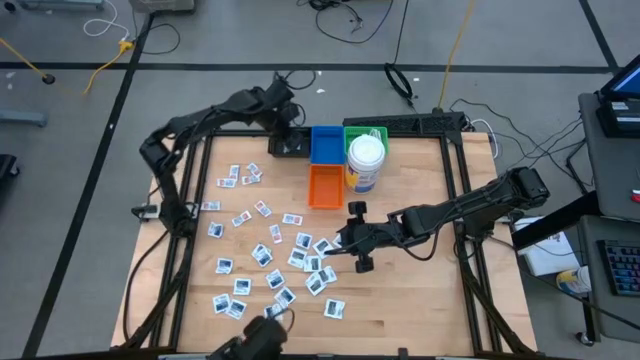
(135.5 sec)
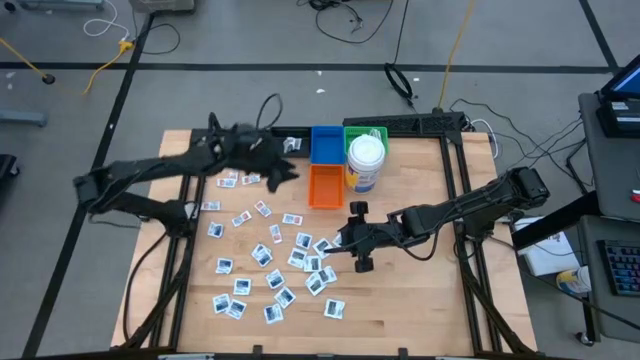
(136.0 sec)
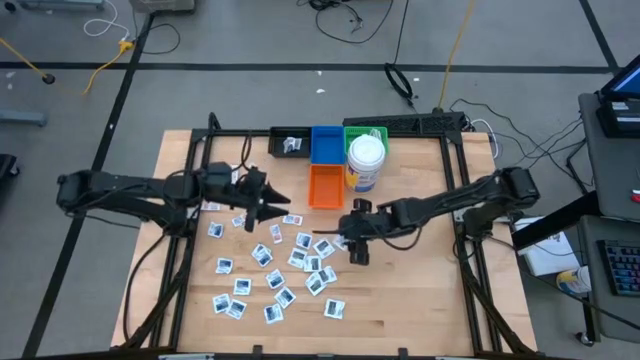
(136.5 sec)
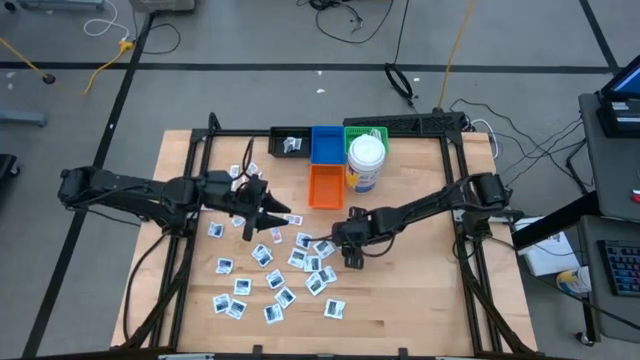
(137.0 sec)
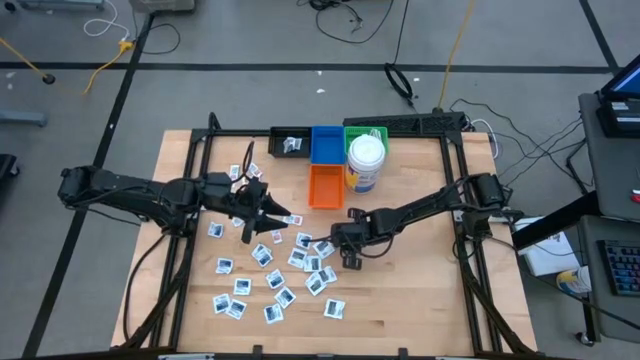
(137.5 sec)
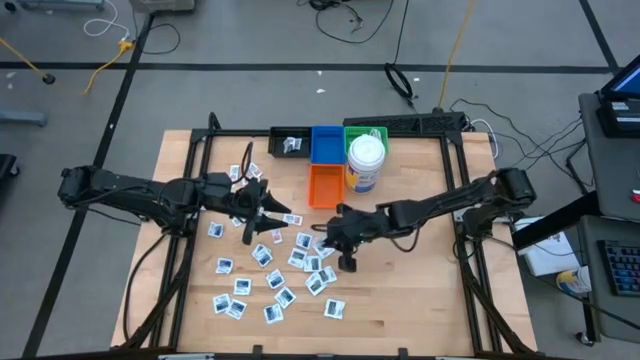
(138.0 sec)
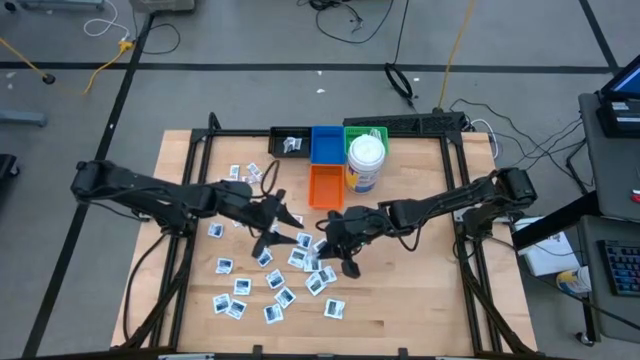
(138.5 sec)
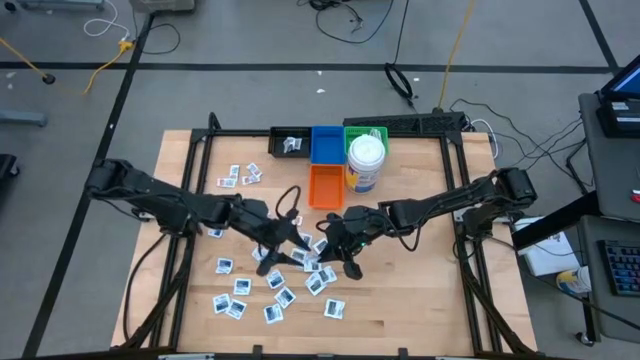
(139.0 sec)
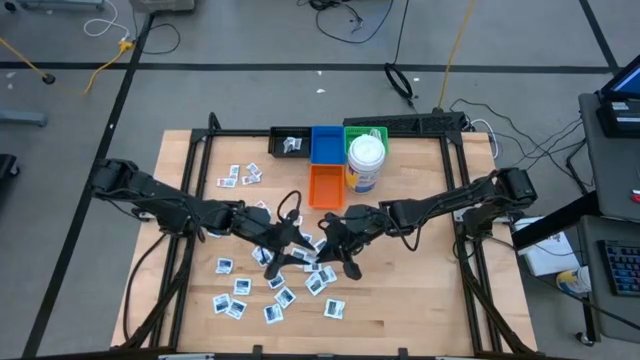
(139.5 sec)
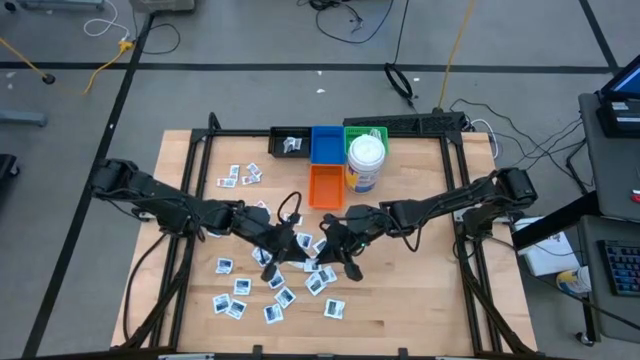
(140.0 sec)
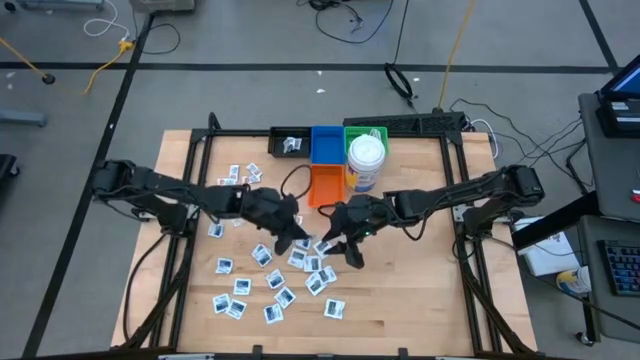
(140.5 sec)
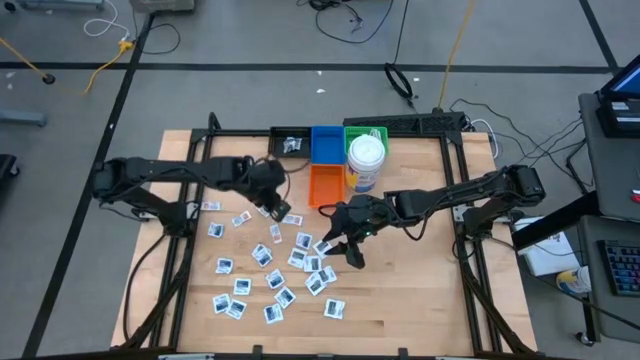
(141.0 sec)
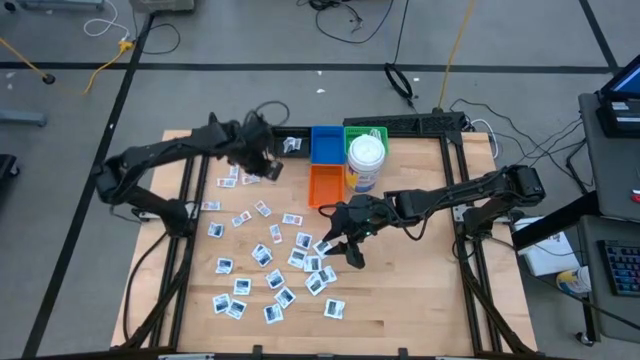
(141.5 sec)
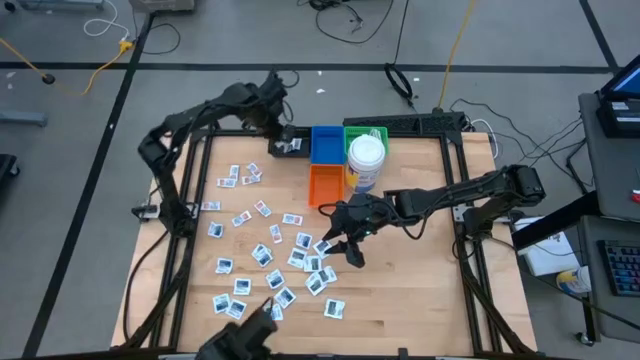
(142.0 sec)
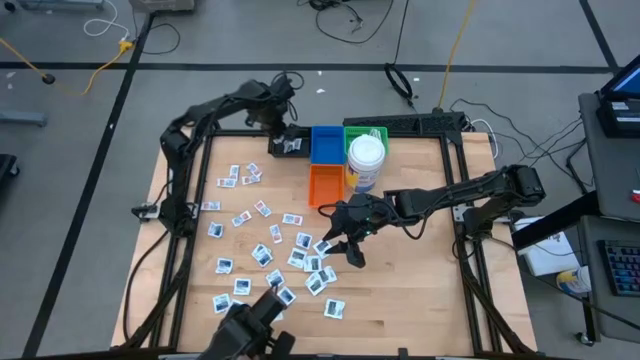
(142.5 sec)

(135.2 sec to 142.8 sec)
Task: Pick & Place First Aid Supplies
Put the gray towelette pack into the black bin

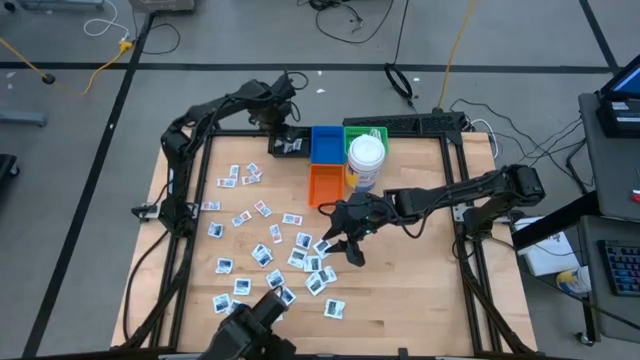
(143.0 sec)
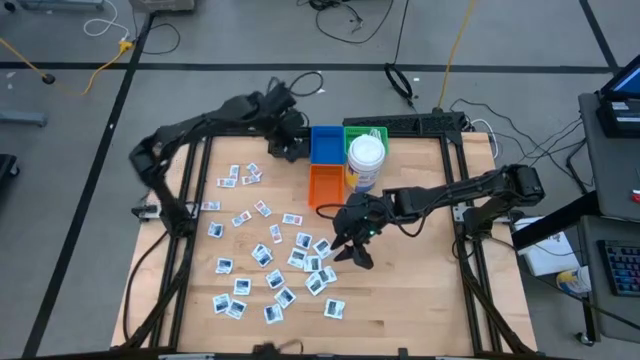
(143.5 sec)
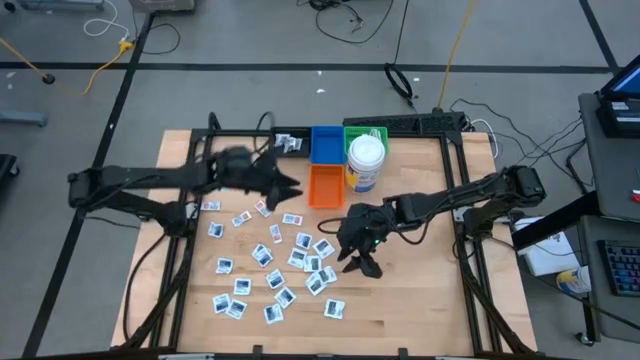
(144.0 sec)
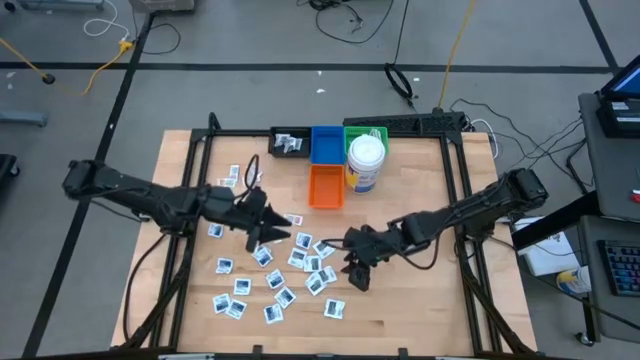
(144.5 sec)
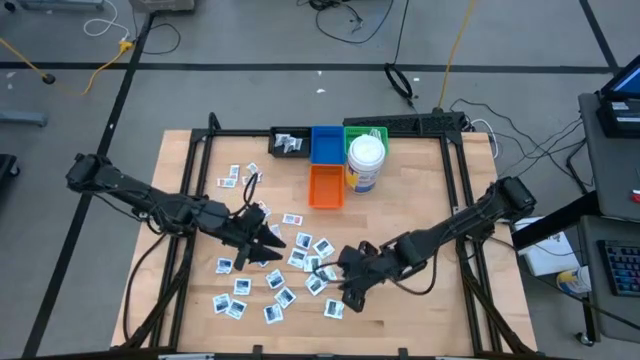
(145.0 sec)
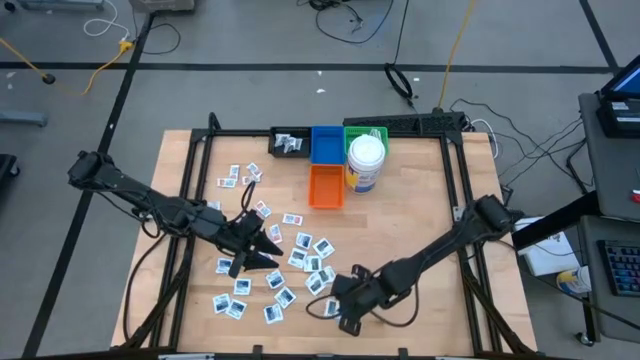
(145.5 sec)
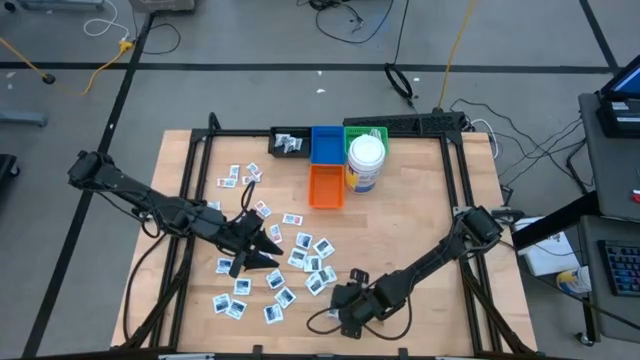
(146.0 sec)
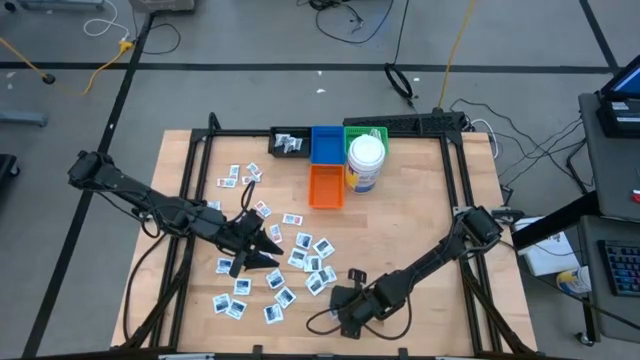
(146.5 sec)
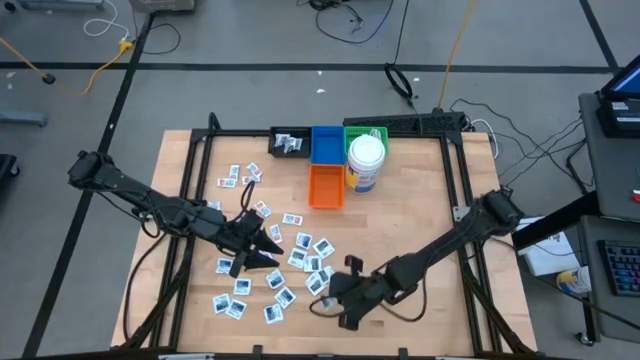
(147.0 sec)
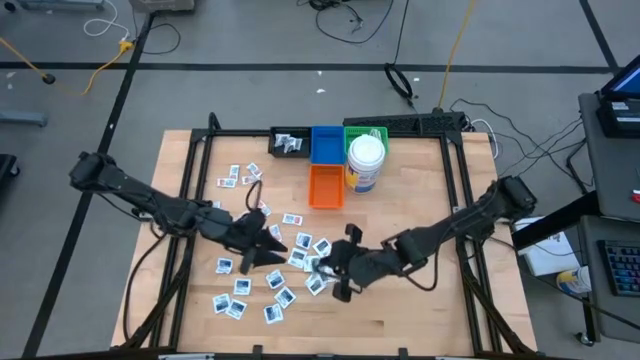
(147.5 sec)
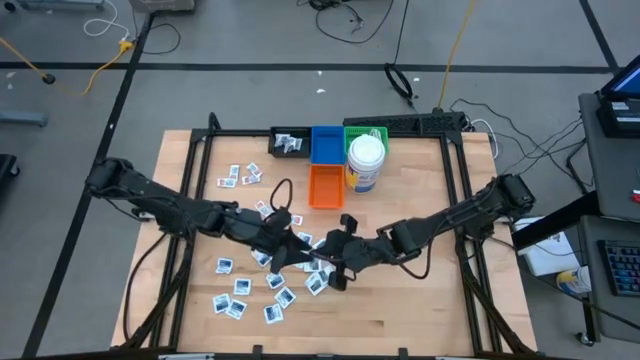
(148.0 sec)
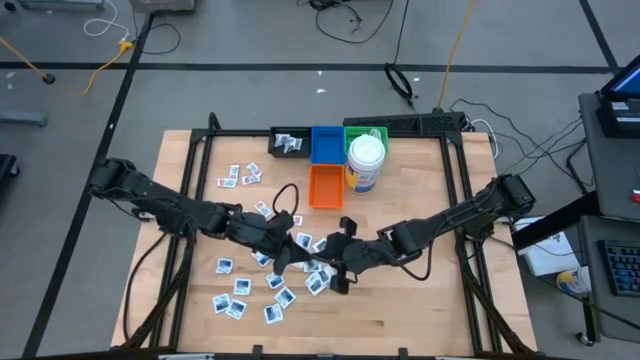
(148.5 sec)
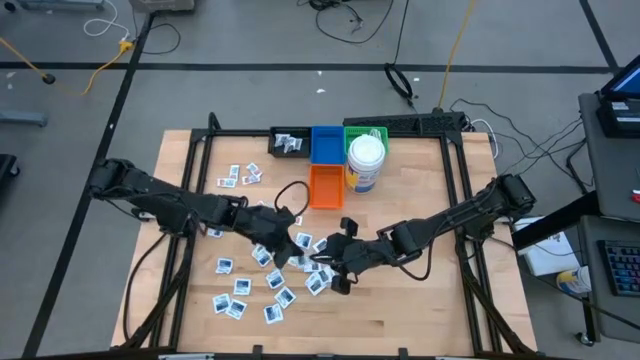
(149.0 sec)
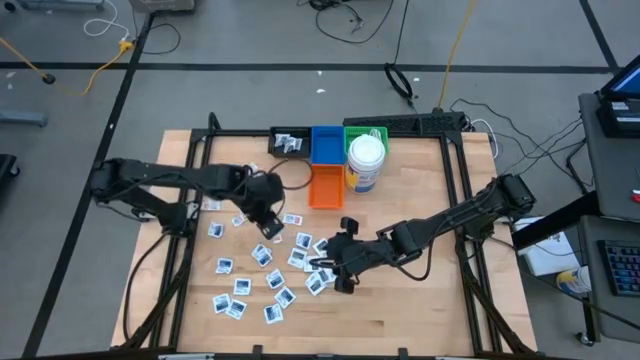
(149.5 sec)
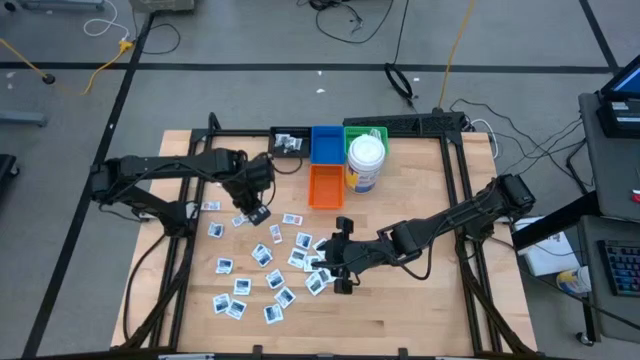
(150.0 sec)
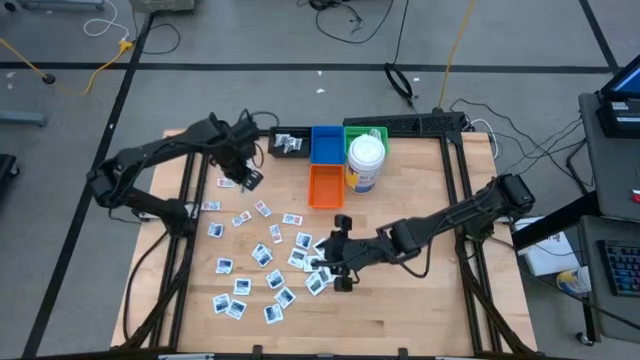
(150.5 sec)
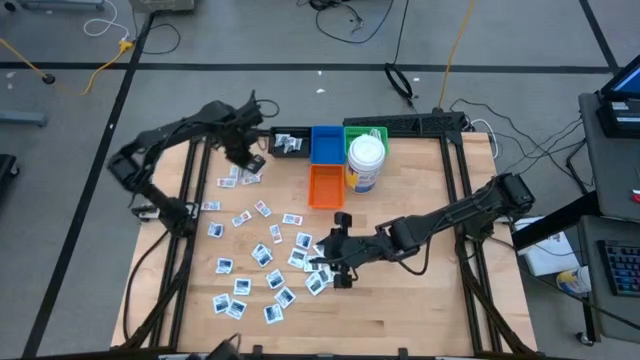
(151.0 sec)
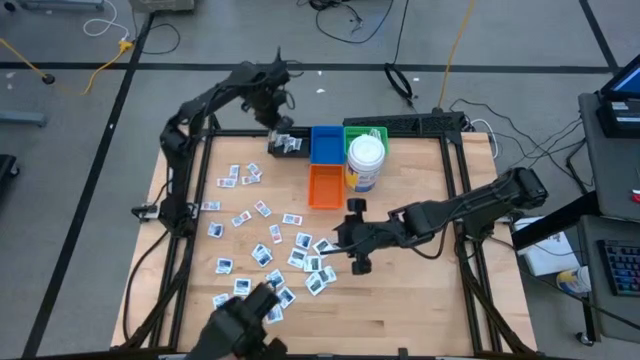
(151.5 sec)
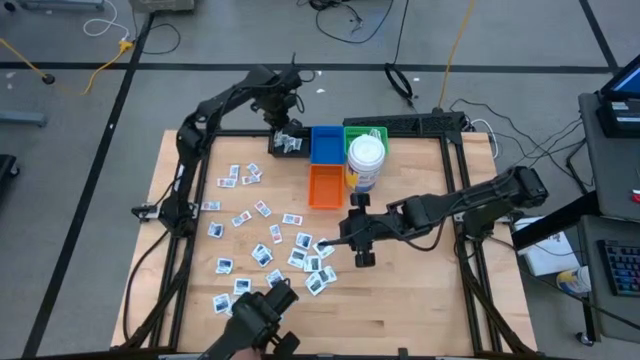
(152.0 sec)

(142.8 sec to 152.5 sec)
Put the gray towelette pack into the black bin

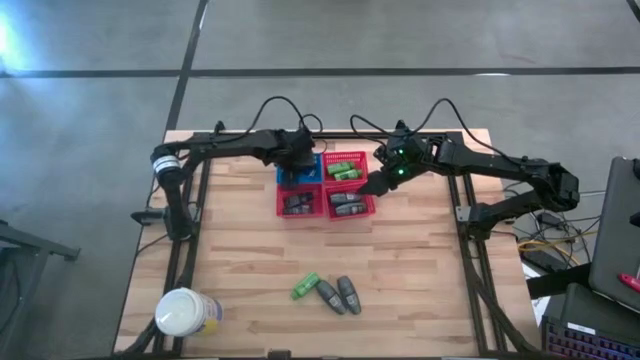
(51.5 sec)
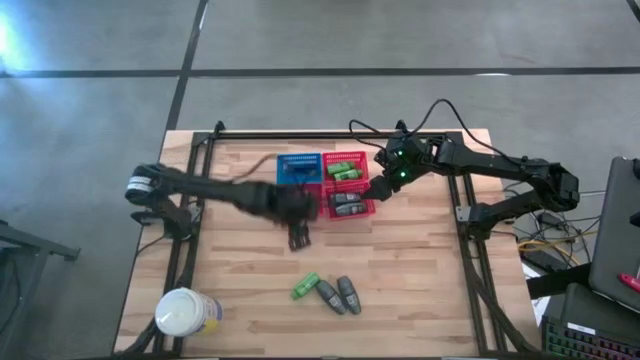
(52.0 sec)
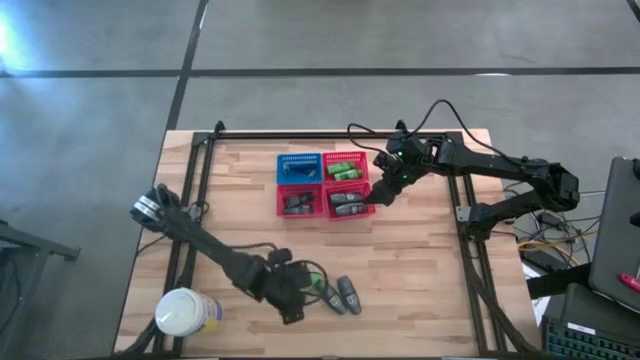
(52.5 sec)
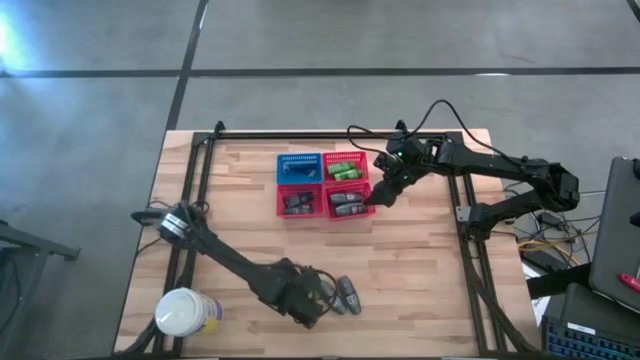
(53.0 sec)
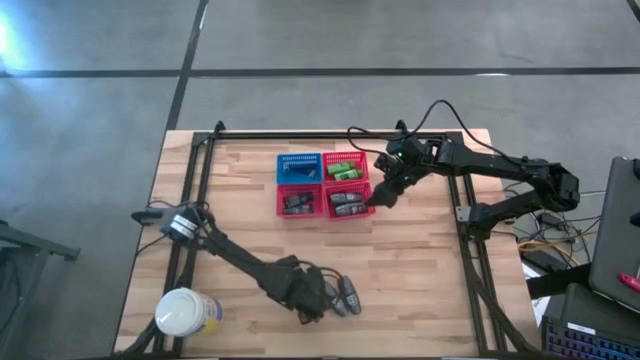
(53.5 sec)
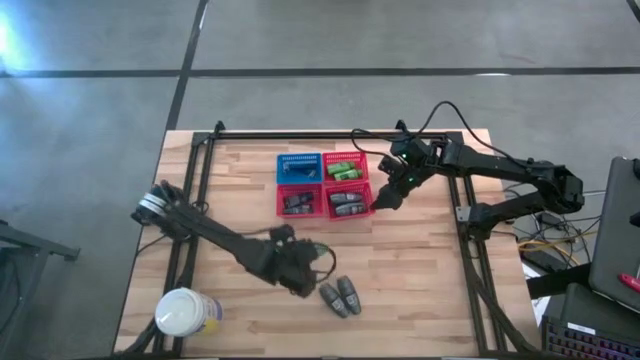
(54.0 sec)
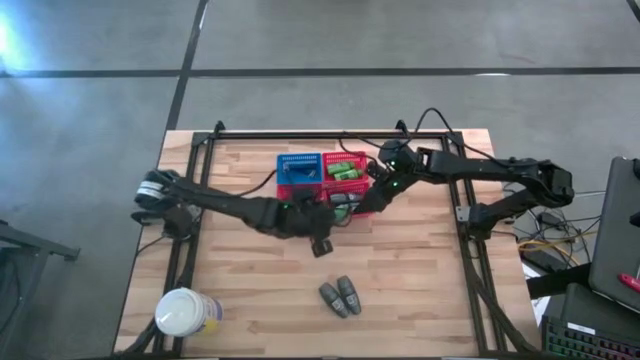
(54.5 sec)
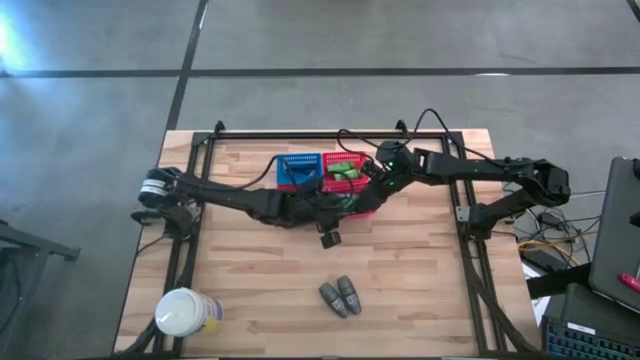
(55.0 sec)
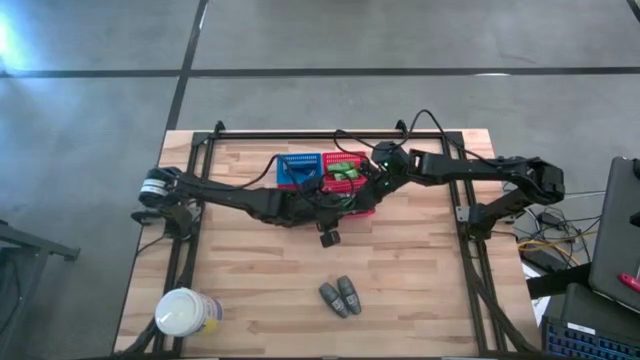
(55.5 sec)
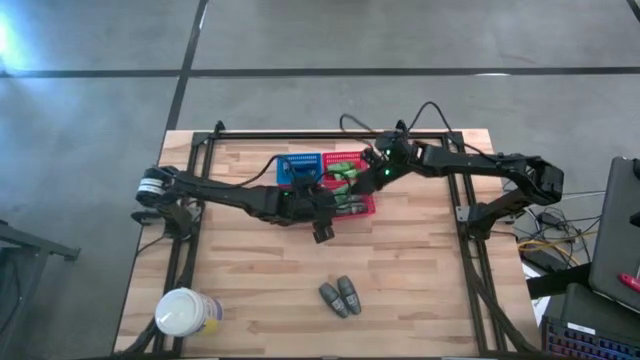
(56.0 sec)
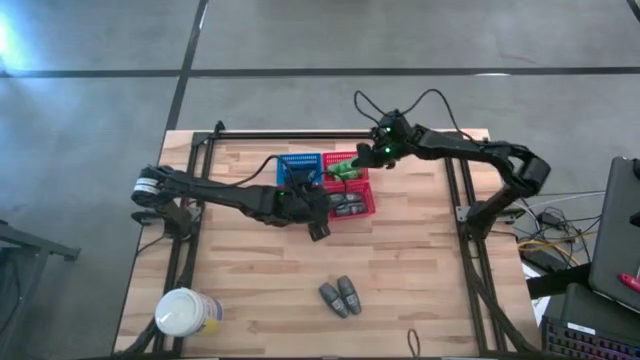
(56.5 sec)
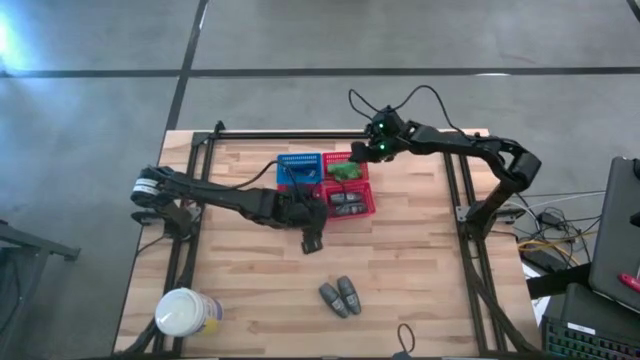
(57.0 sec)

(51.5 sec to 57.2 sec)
Task: Pick & Place Travel size toiletries
Put the shampoo into the top red bin
